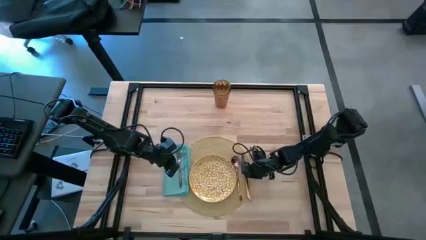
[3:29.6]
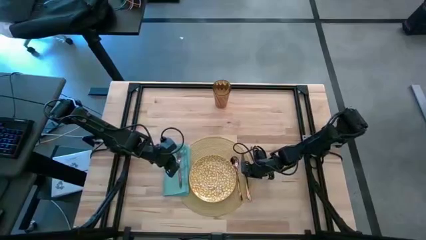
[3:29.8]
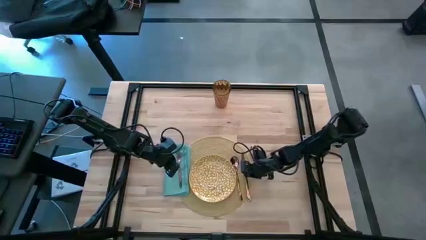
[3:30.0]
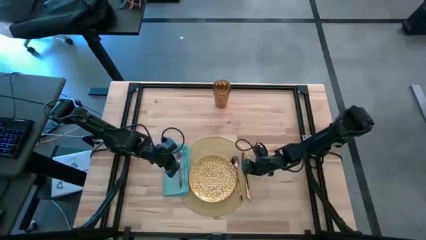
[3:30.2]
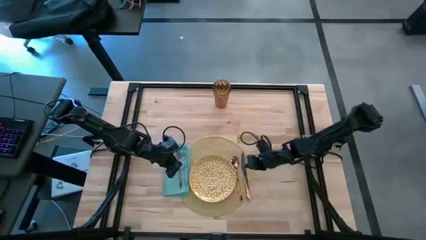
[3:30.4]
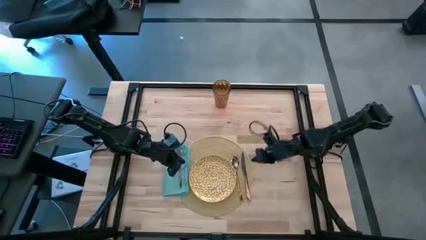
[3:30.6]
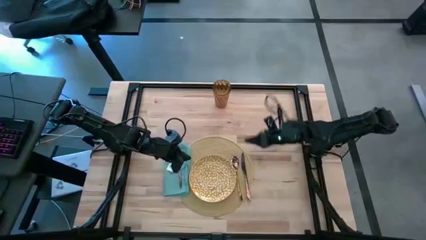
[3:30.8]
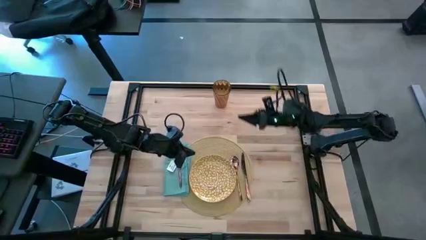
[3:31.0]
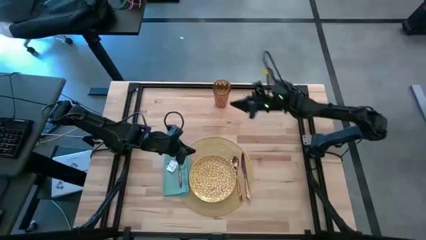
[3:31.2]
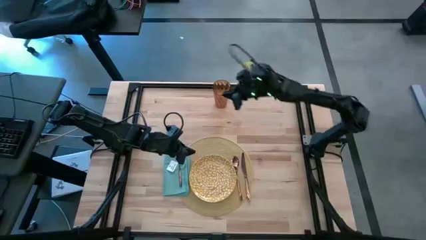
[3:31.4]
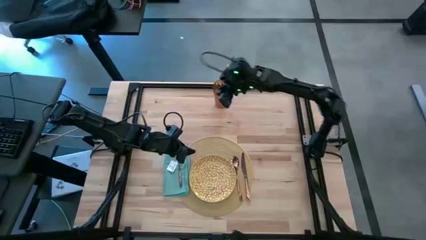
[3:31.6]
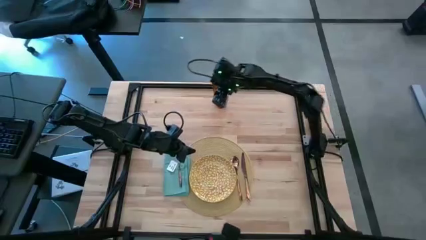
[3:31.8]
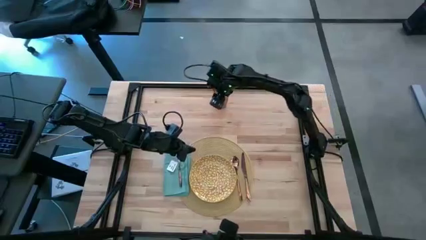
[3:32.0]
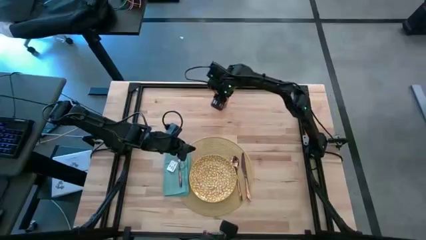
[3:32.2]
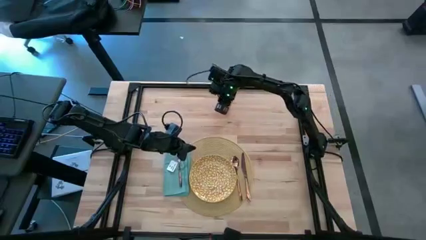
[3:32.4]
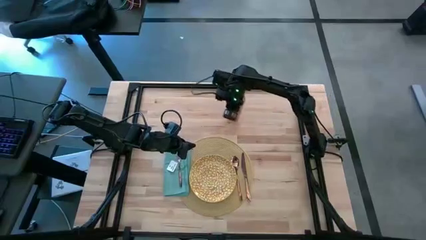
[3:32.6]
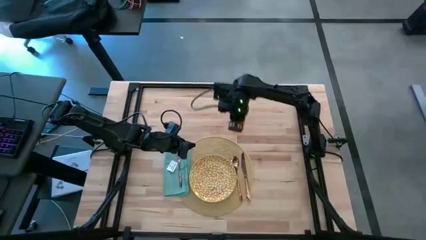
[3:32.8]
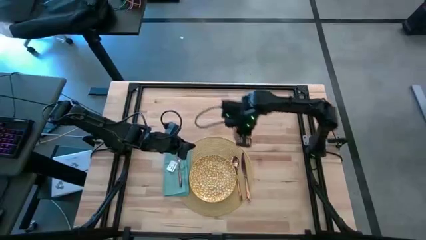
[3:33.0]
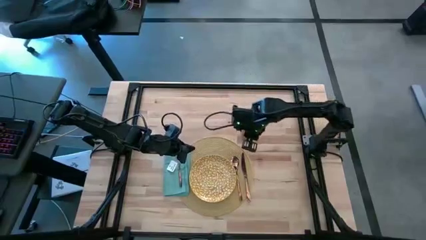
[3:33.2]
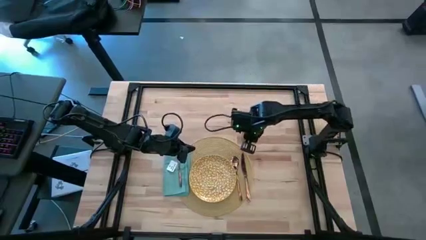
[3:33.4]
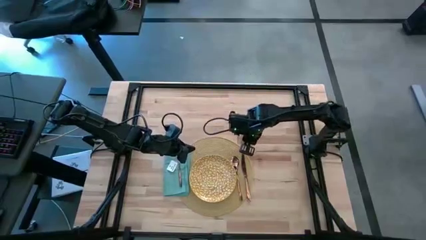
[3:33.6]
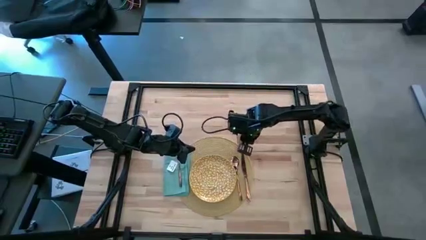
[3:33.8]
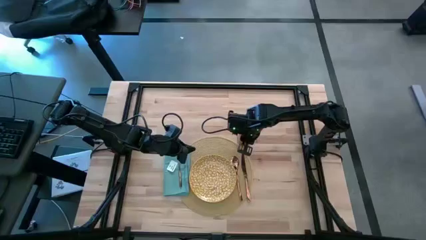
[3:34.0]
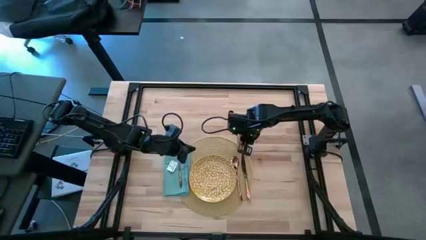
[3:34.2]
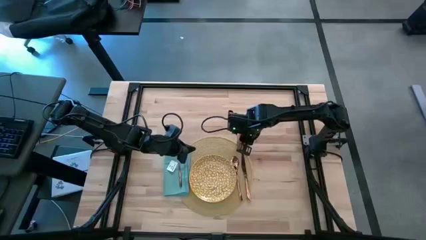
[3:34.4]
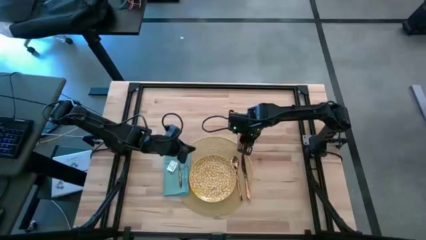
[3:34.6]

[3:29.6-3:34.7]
Task: Set table place
Move the brown glass to the top right of the brown placemat

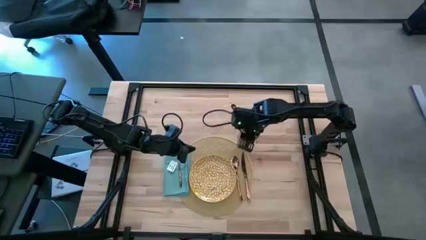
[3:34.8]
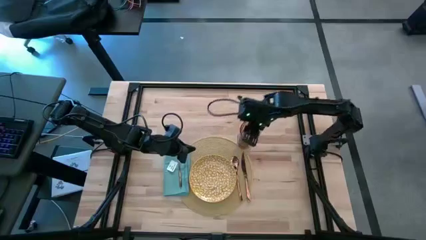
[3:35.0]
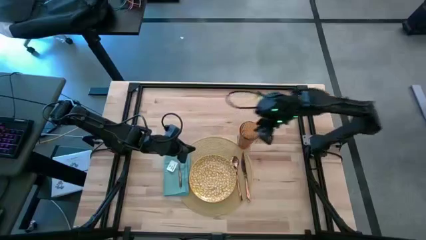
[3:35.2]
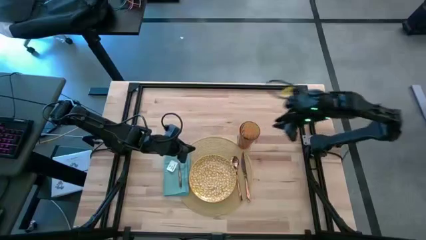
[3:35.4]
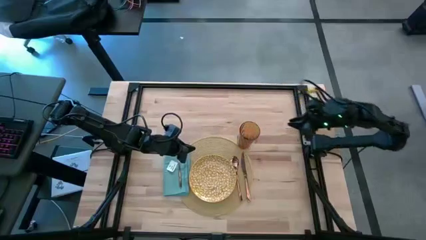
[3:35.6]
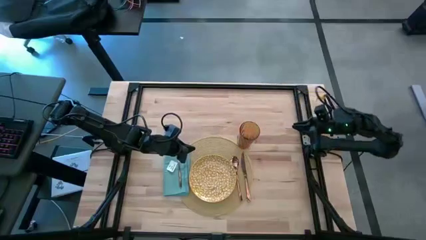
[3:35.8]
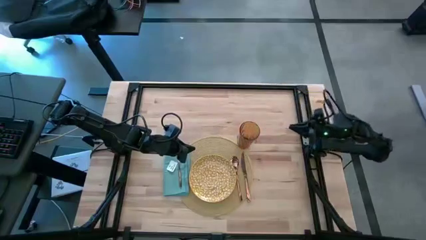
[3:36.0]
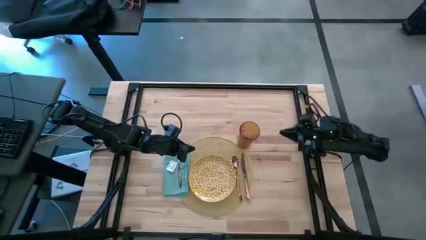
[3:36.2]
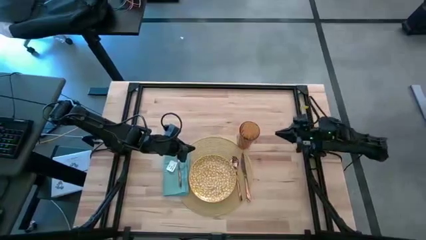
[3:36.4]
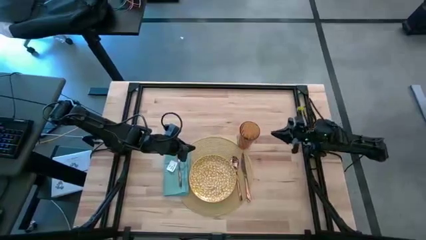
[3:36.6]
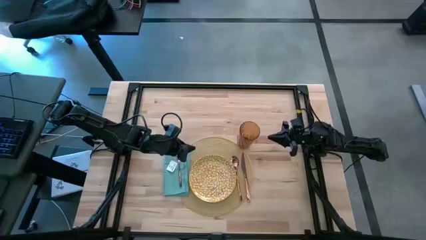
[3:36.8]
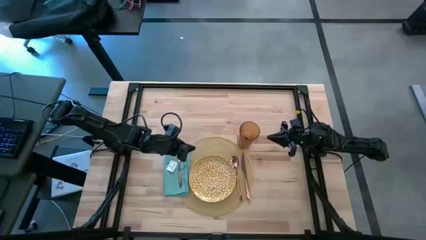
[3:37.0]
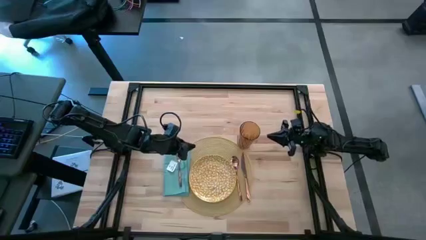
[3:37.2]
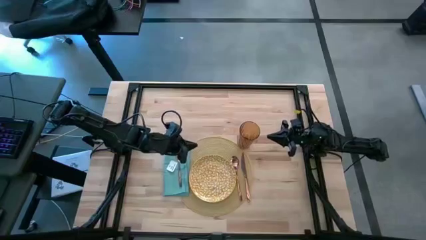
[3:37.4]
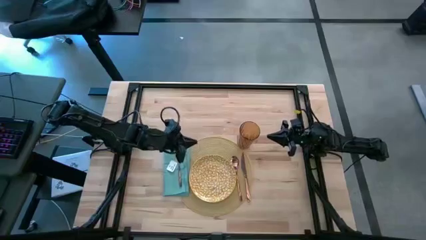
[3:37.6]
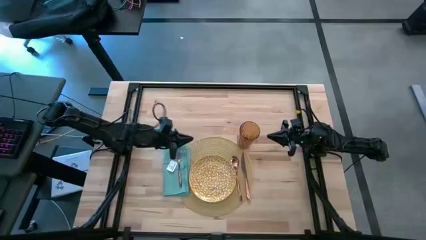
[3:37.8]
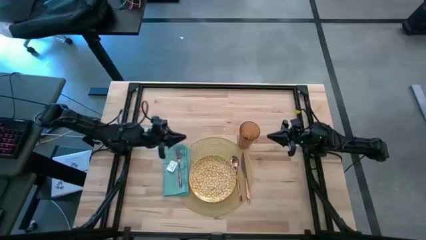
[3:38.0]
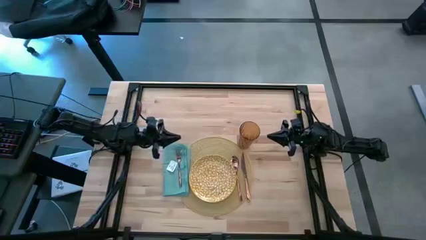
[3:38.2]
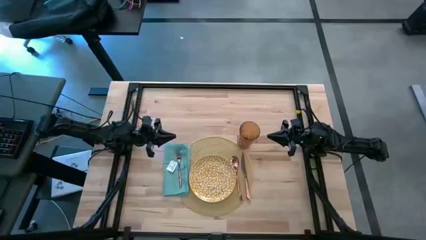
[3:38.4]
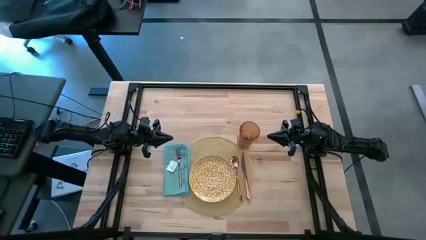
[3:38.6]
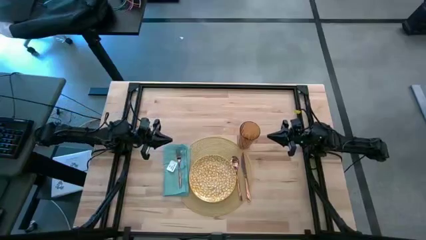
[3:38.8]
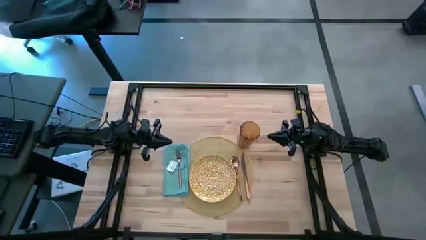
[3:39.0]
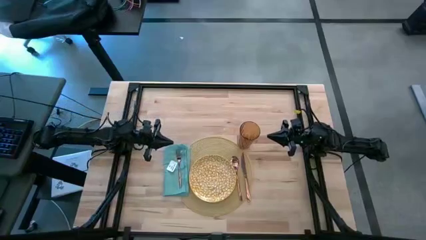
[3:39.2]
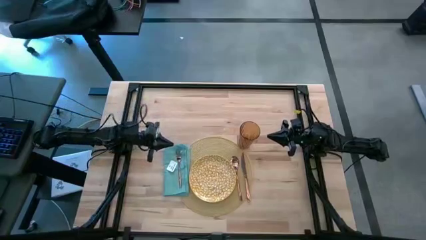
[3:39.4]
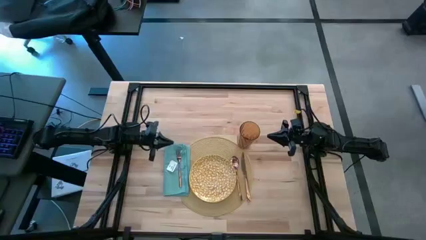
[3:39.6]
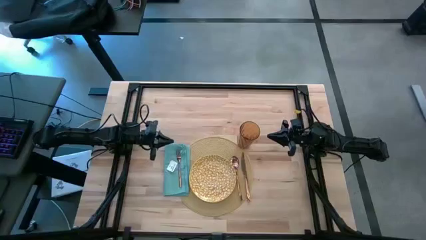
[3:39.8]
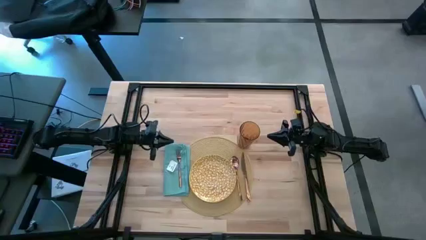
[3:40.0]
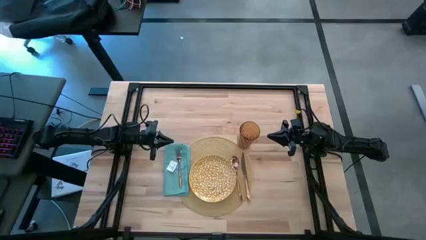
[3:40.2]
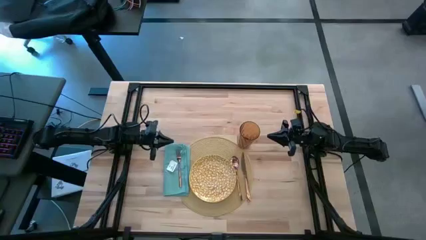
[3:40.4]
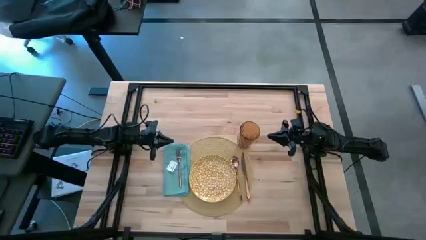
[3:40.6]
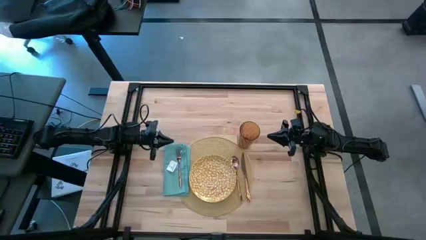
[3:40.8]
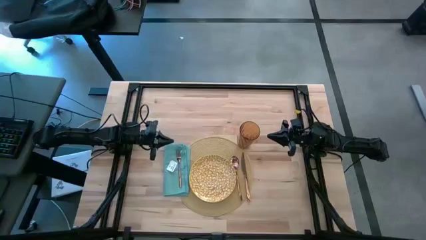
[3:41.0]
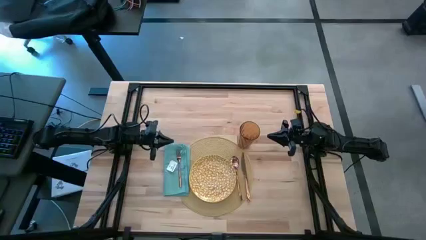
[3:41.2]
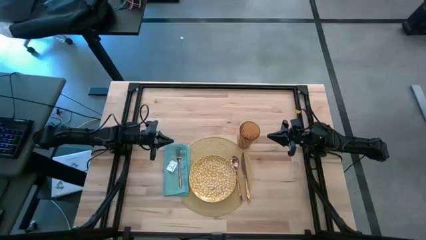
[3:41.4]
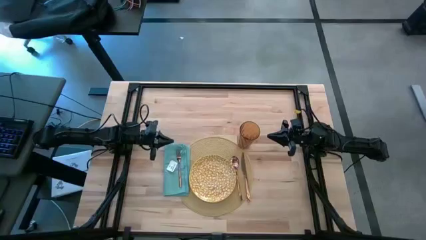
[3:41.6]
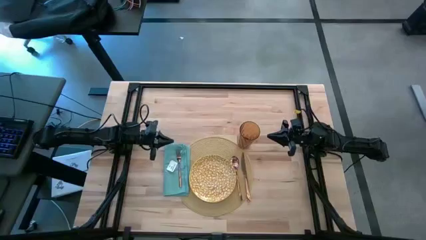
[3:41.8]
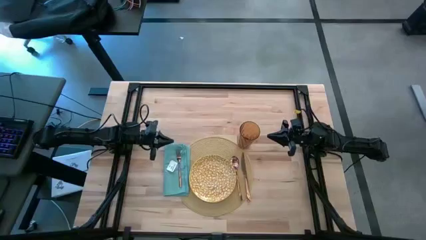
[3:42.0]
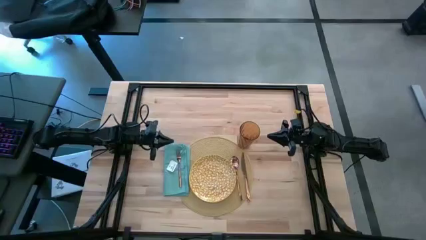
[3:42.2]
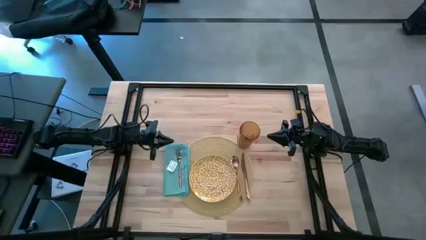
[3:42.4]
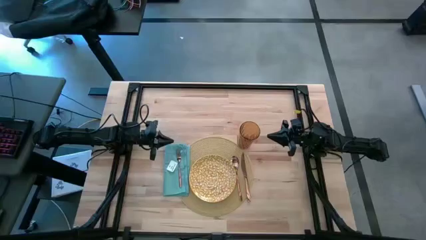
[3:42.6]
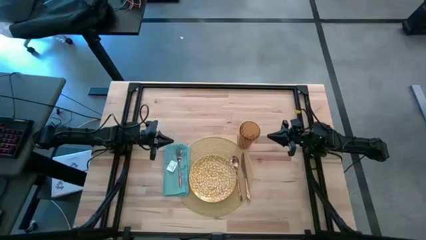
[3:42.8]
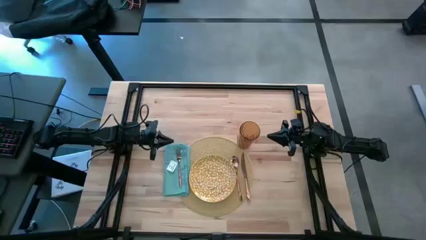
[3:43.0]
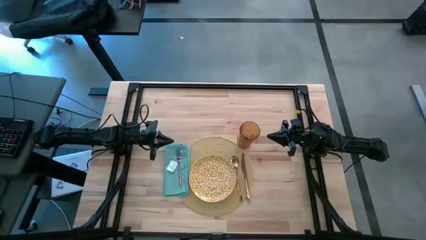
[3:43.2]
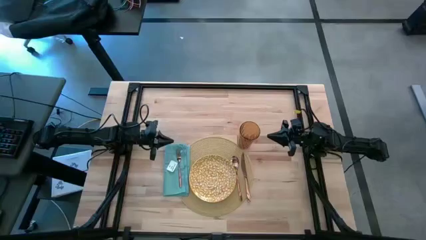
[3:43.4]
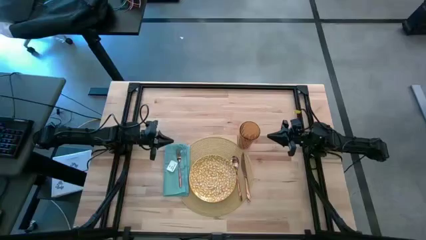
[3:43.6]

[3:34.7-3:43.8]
Return to Home Position

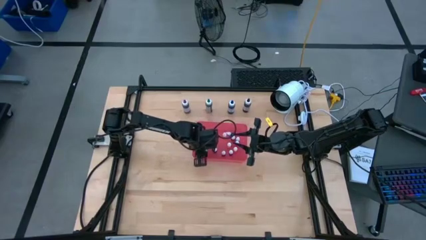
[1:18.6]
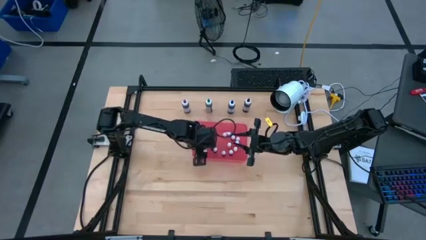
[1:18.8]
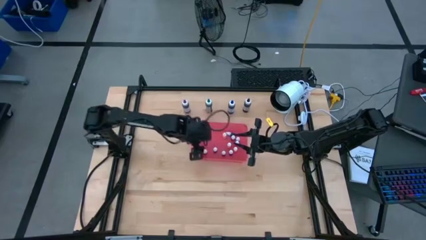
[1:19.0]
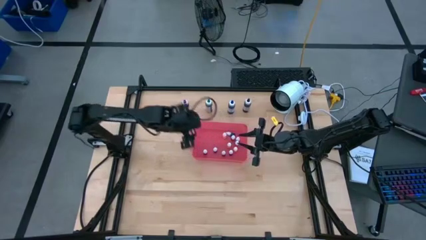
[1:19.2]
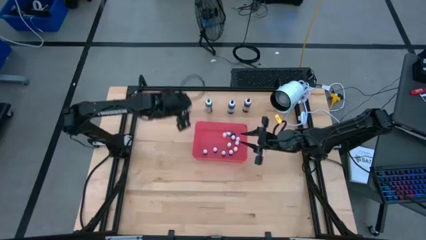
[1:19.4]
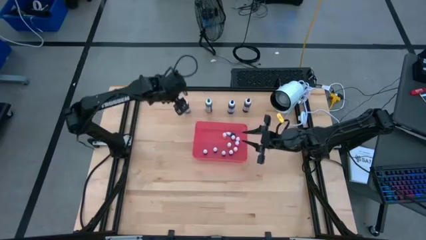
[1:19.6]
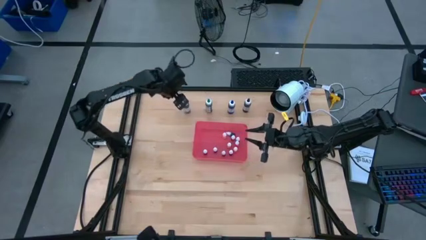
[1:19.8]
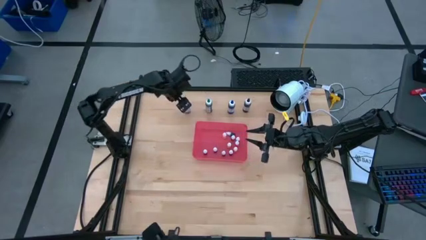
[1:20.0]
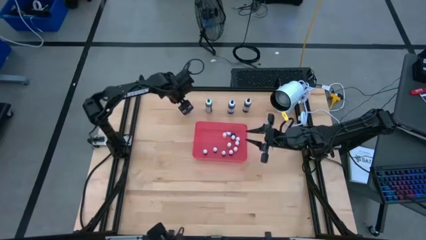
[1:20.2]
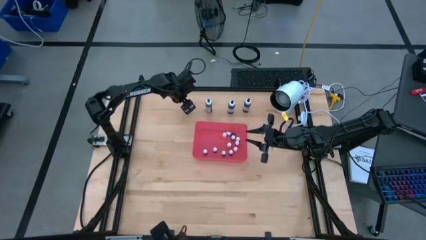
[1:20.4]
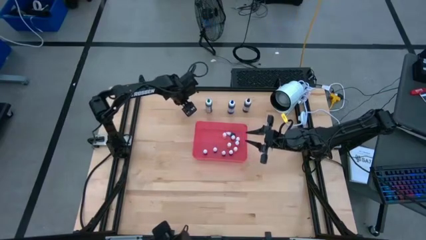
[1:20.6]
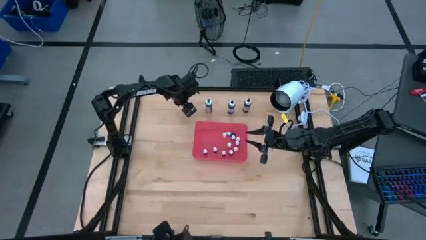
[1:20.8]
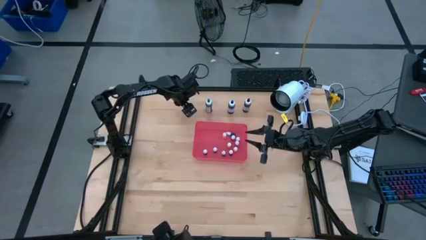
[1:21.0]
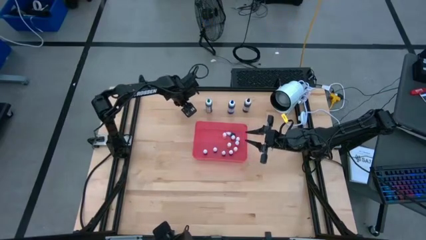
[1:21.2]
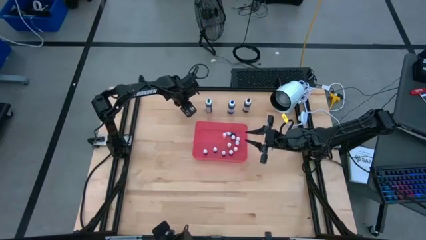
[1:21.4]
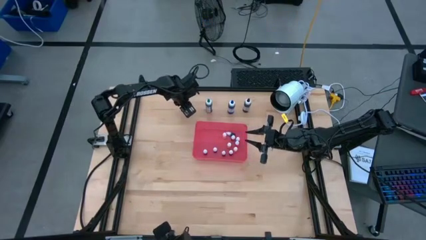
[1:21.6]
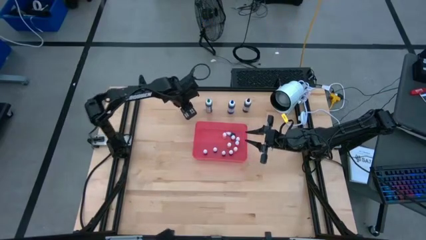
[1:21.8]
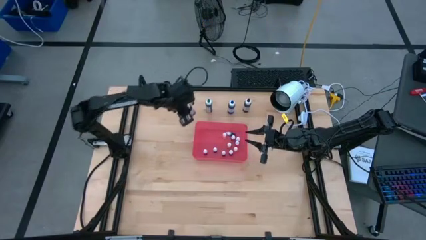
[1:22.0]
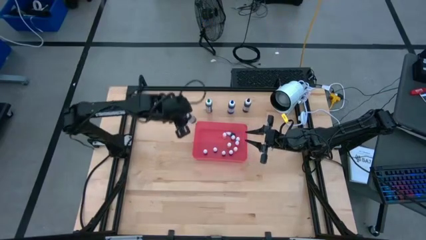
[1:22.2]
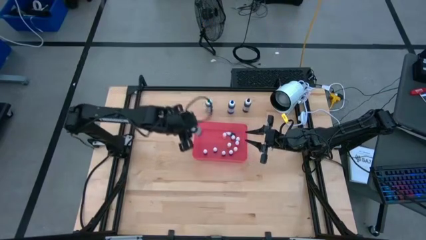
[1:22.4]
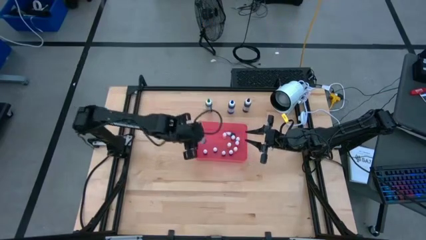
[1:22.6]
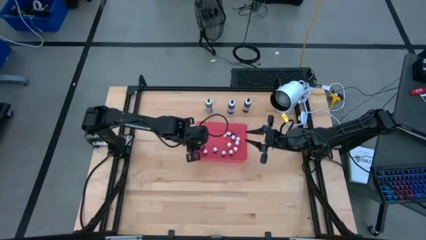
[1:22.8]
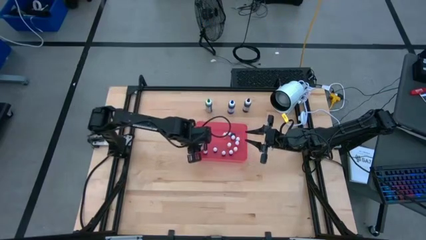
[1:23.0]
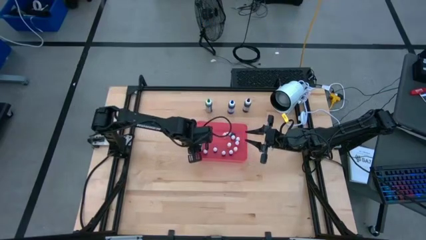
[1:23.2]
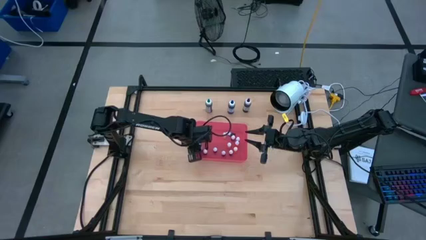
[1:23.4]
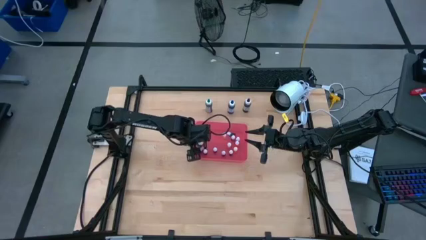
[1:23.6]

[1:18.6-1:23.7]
Task: Pick & Place food coloring
Put the large purple food coloring bottle into the red bin
